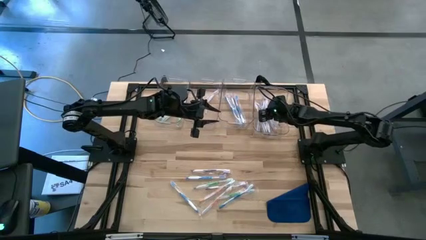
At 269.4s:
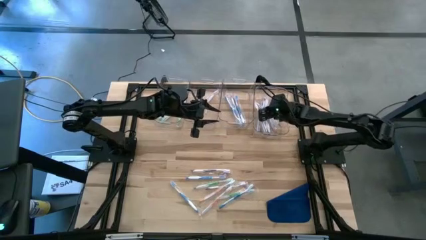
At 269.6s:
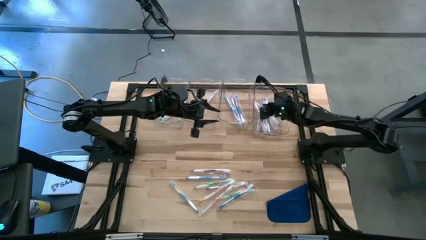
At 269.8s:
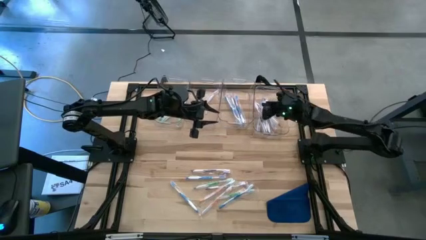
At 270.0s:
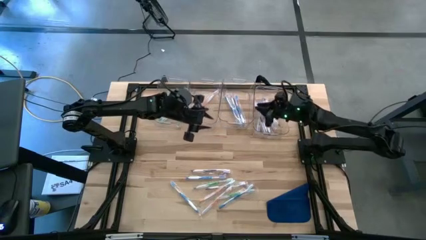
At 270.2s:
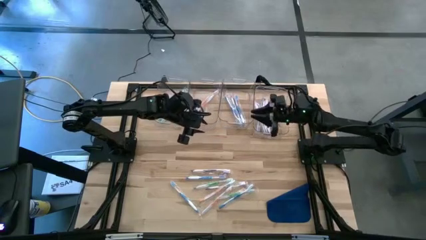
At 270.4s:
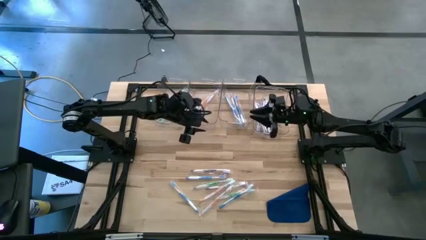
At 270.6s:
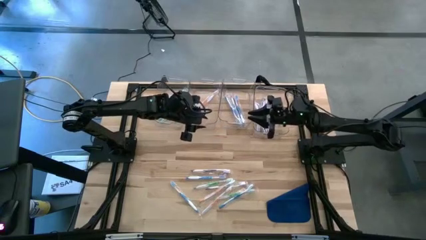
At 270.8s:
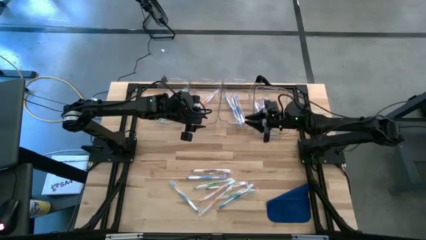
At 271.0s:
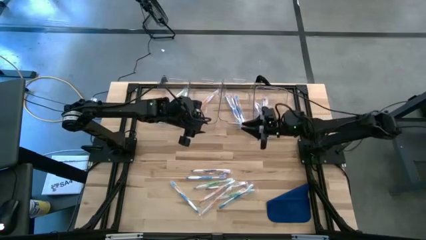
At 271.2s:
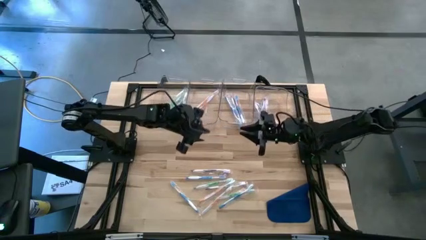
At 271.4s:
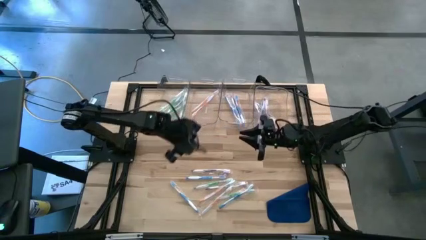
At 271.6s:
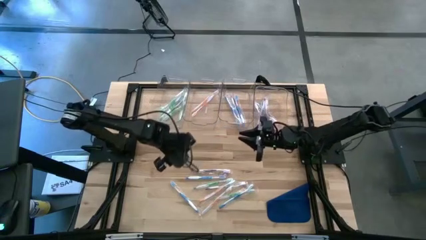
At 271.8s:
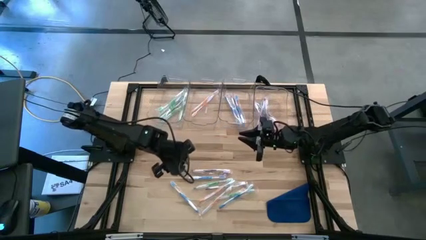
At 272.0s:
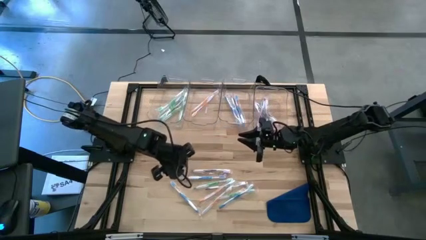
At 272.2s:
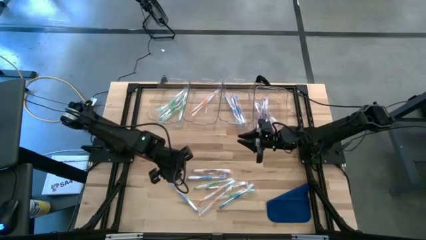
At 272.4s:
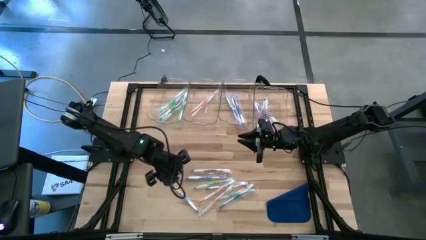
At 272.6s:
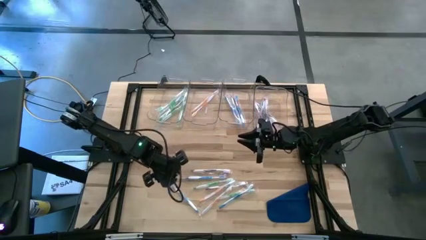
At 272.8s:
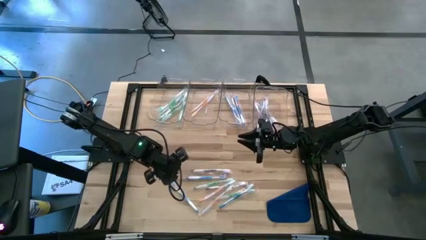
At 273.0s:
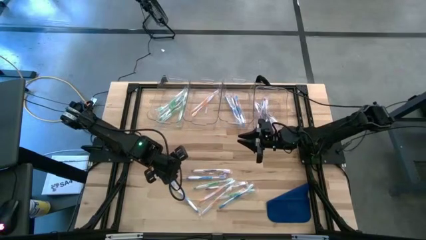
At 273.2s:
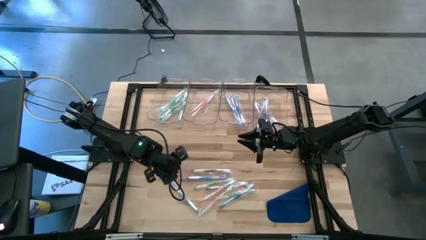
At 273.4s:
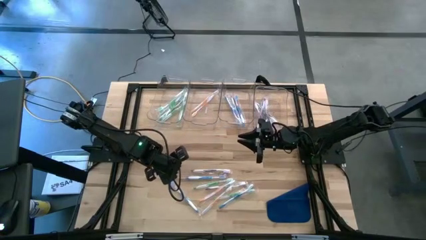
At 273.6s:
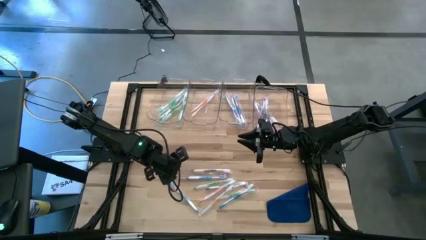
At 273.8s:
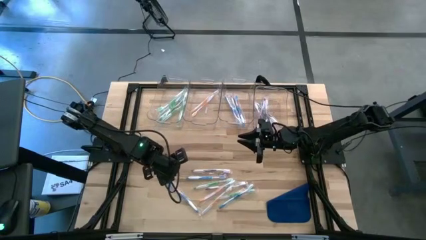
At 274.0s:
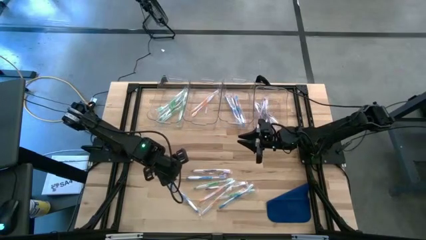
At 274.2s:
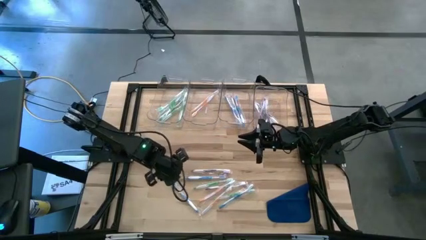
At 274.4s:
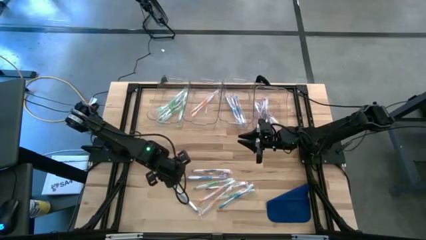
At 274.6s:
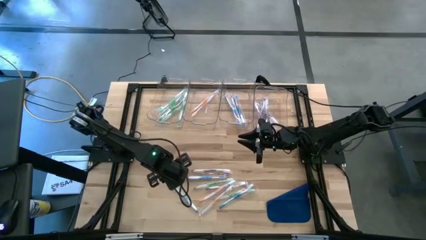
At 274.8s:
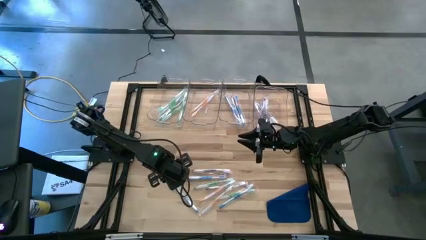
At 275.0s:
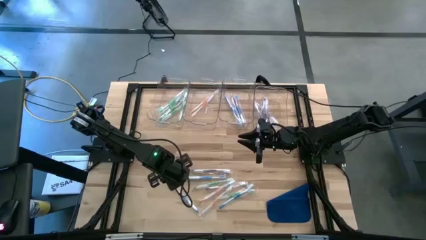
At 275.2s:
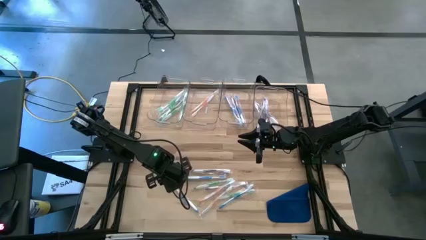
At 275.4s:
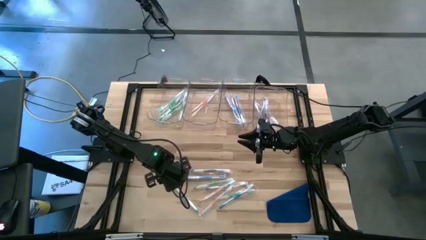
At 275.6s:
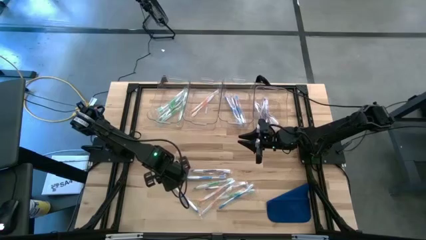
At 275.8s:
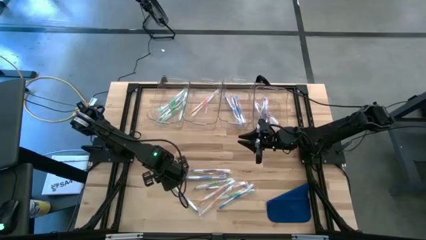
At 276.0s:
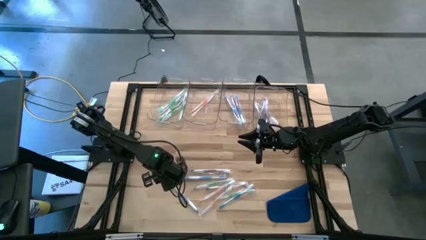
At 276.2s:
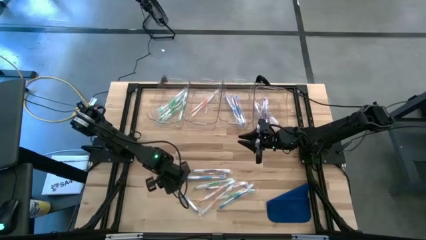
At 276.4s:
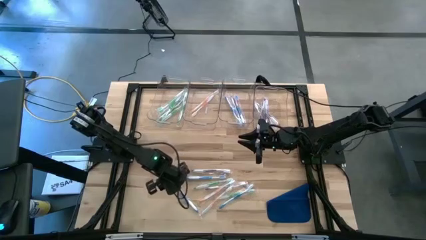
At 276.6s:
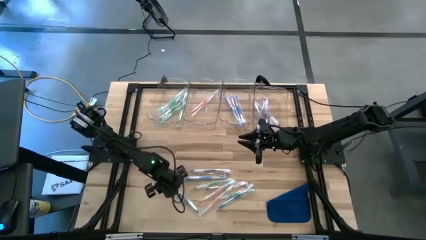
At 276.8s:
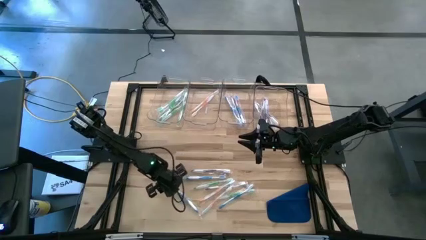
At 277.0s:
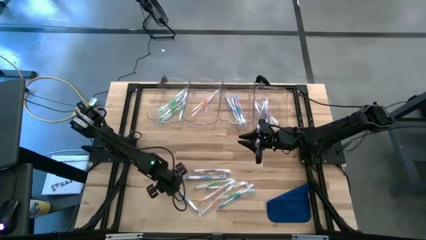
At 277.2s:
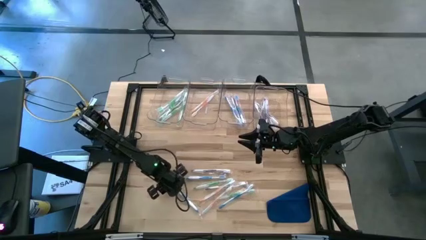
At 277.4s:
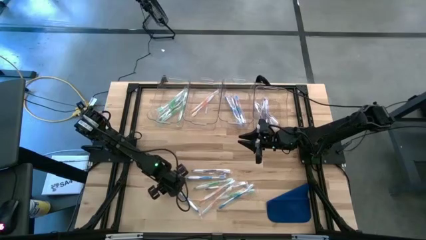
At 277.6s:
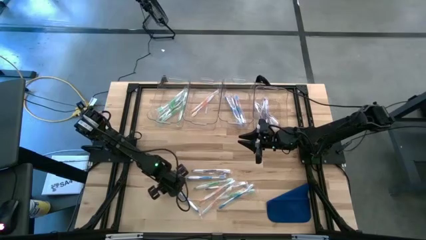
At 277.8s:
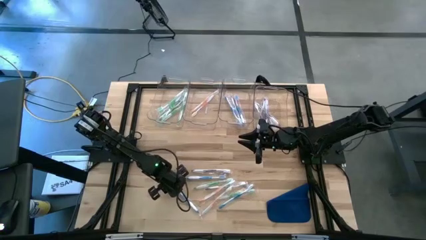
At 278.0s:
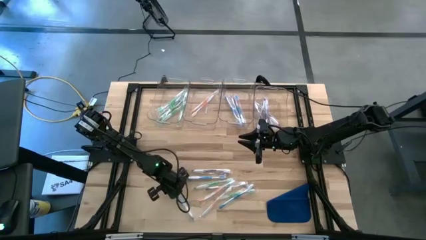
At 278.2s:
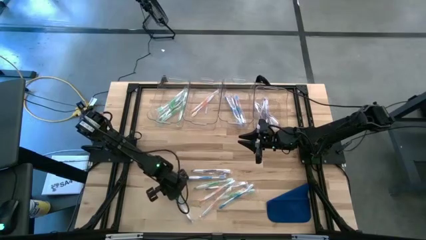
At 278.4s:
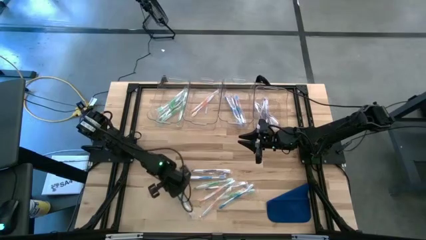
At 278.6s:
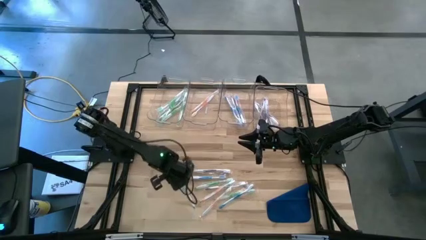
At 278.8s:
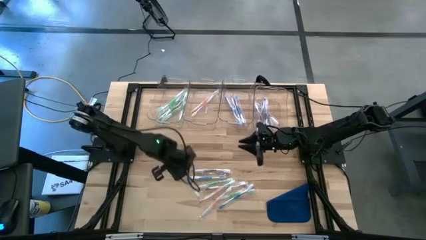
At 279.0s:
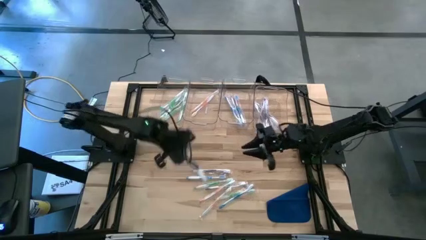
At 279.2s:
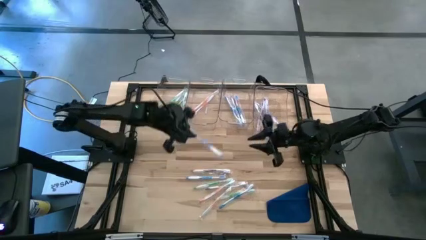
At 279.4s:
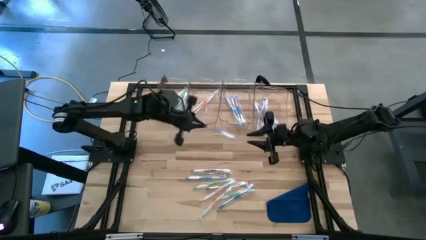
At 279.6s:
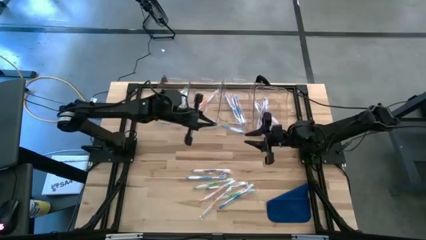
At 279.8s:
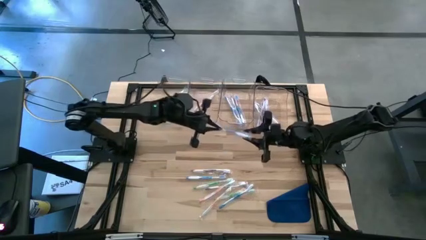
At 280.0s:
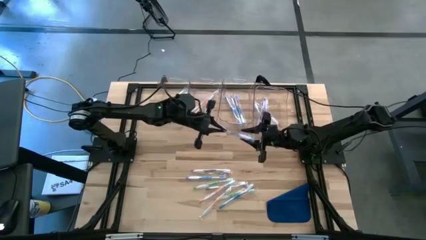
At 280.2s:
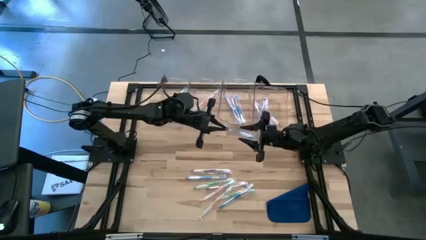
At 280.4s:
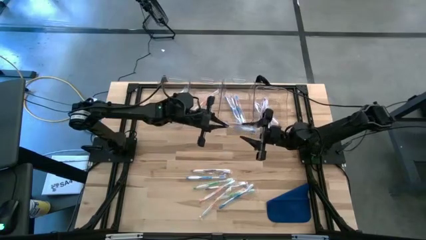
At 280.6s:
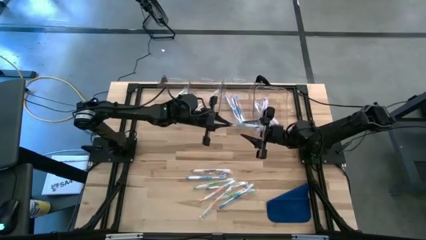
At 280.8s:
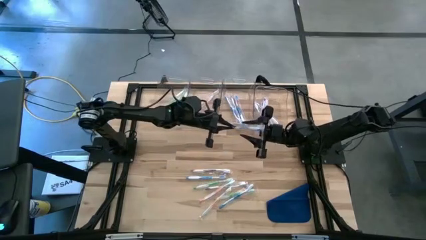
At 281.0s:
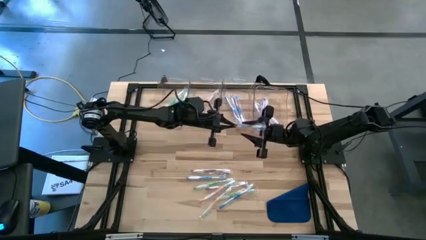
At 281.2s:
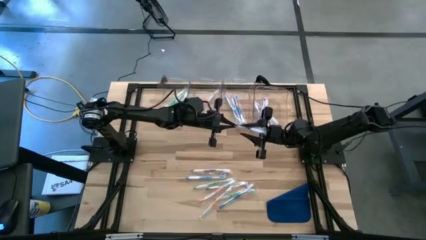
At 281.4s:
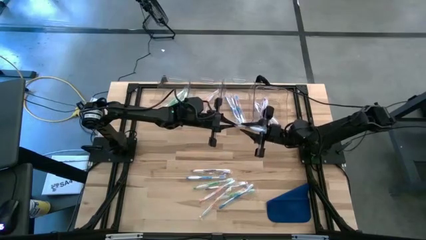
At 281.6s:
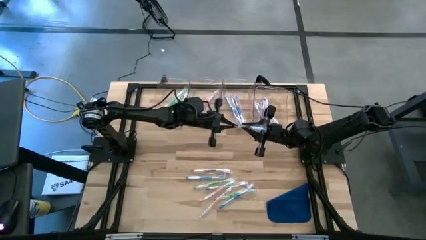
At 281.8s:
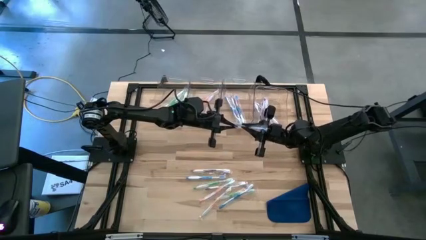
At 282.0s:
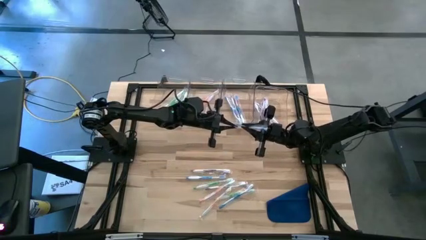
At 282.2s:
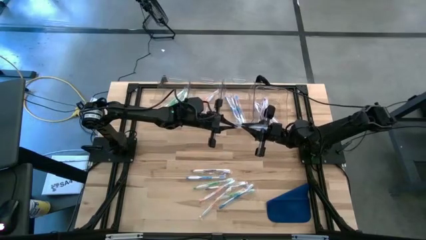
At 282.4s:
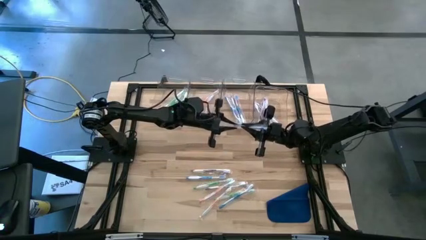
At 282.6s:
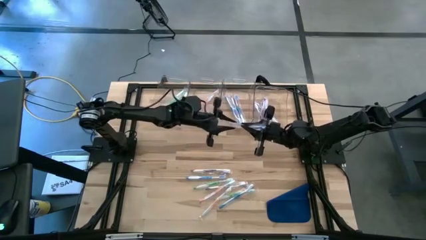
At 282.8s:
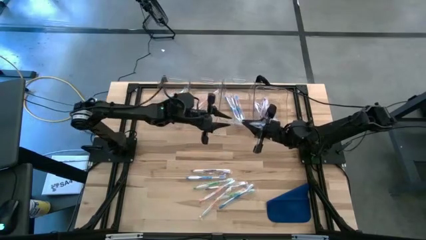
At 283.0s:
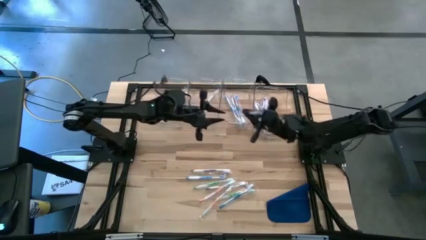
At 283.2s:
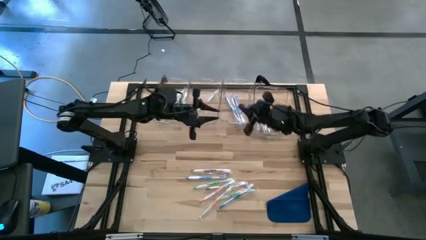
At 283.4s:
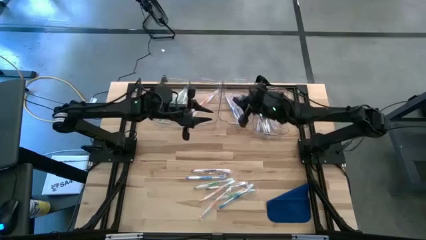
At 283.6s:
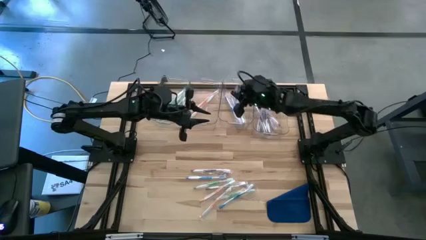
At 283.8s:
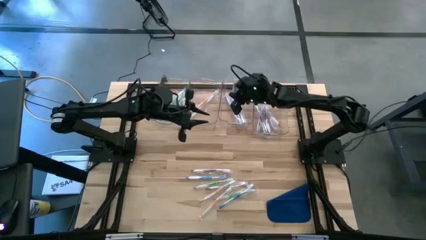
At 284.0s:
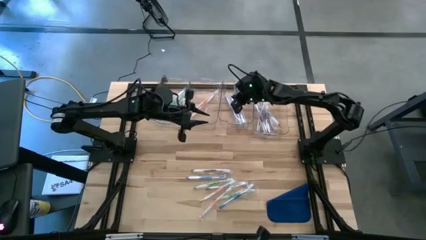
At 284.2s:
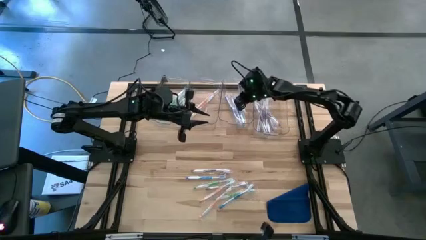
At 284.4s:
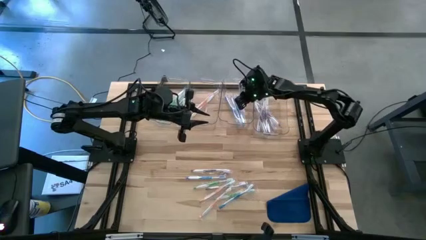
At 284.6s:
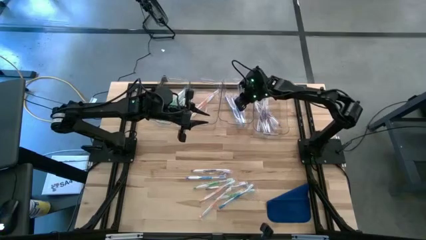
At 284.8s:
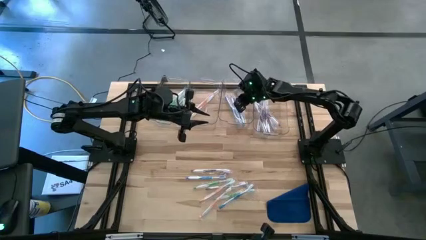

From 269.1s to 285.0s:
Task: Pick & Place Toothbrushes
Put the blue toothbrush into the middle right transparent bin

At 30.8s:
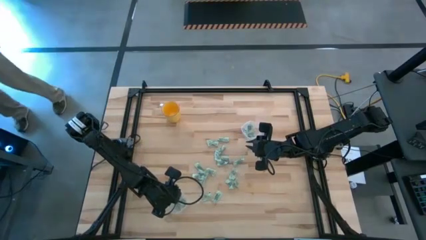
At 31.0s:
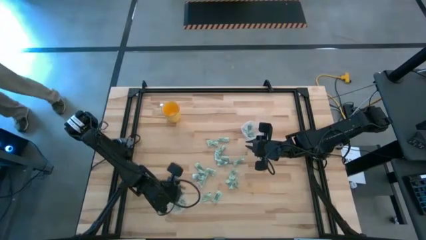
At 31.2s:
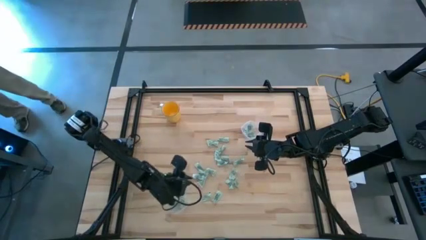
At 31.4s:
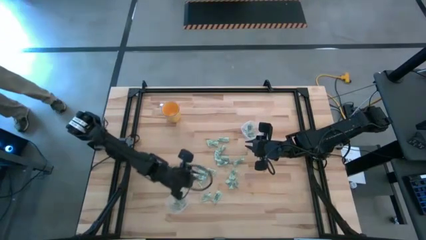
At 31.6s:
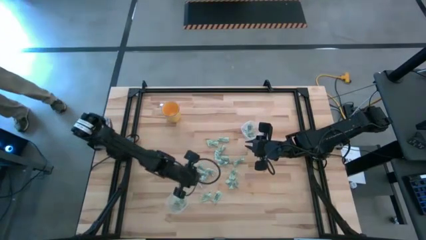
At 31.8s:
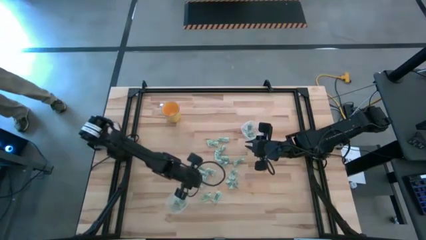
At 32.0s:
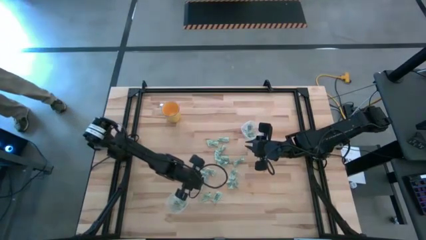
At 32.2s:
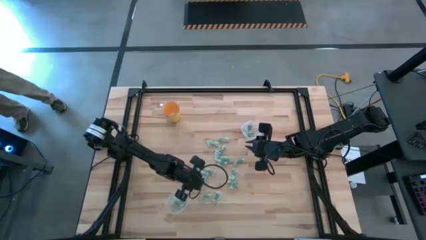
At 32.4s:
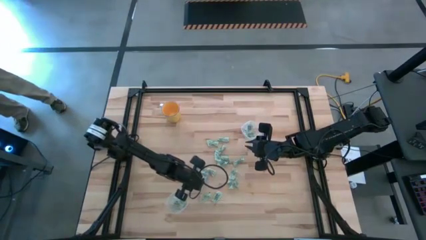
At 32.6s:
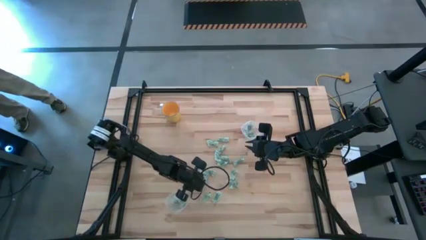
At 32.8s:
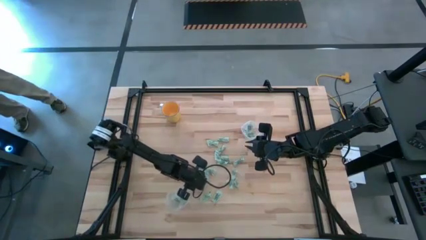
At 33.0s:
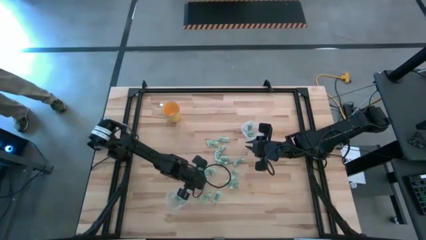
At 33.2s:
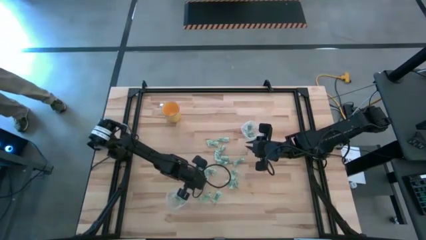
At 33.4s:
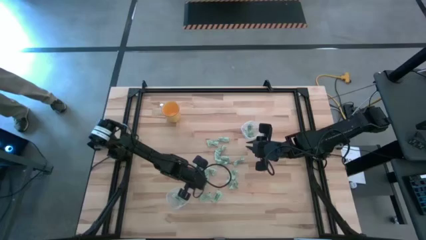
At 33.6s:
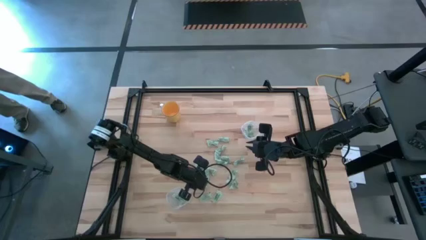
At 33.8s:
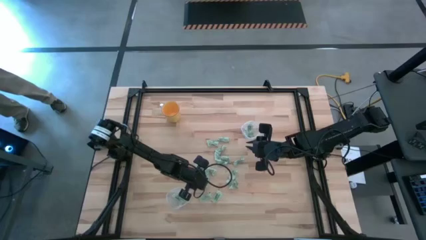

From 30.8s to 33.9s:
Task: Pick and place Stevia / Truvia into bins
Put the green stevia packet into the bottom transparent container
